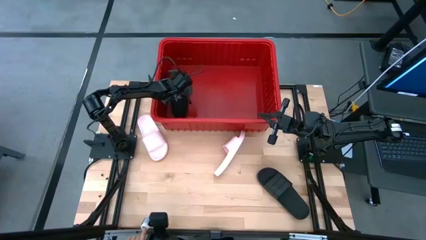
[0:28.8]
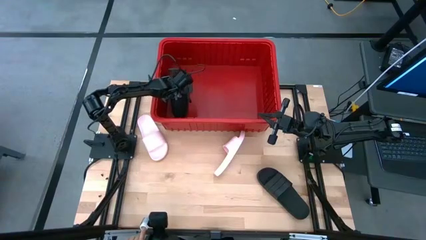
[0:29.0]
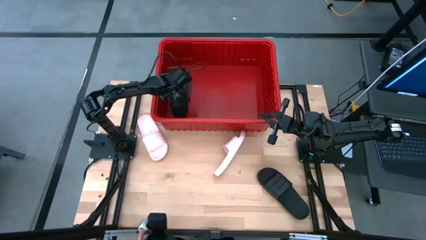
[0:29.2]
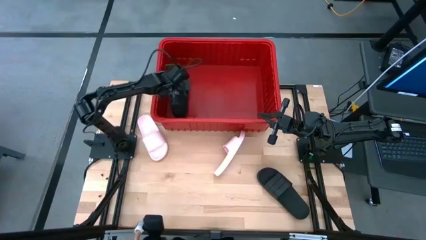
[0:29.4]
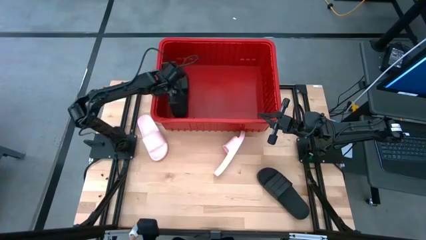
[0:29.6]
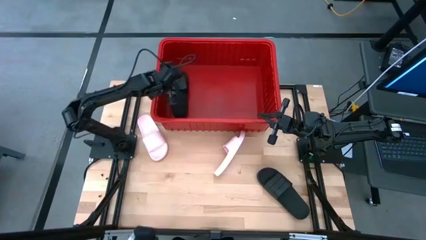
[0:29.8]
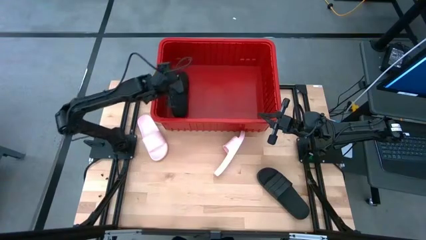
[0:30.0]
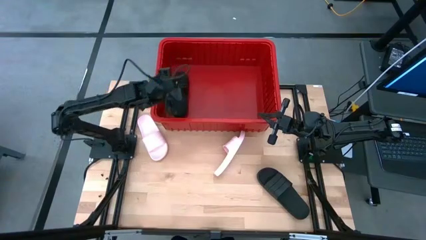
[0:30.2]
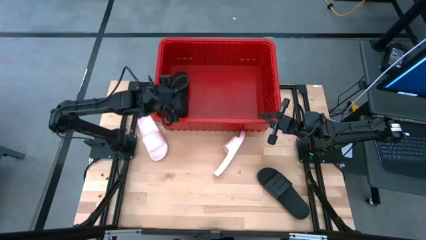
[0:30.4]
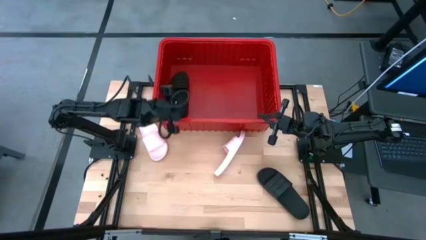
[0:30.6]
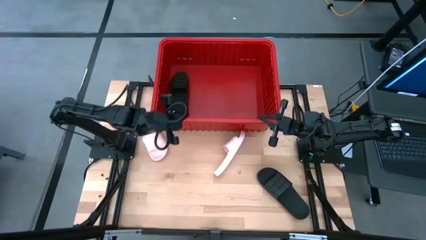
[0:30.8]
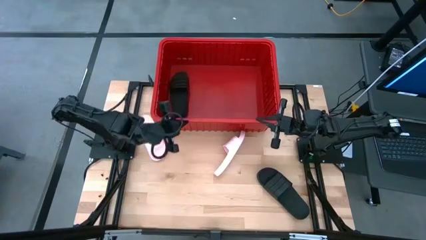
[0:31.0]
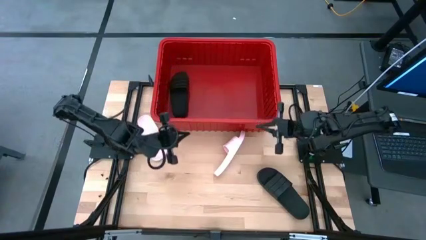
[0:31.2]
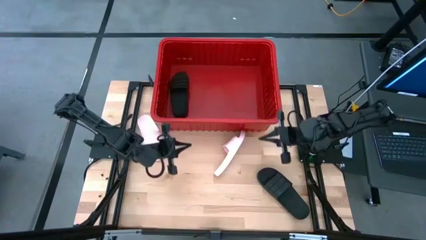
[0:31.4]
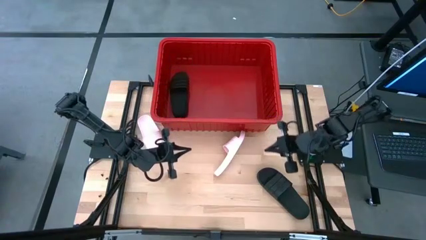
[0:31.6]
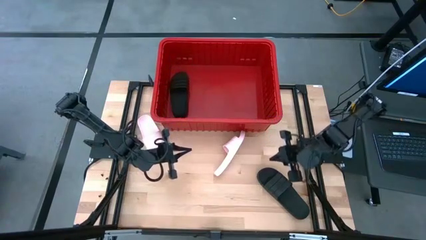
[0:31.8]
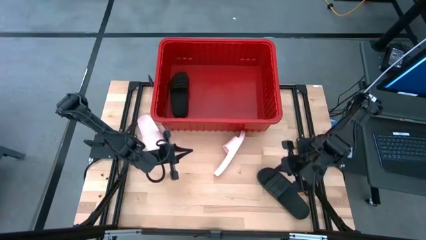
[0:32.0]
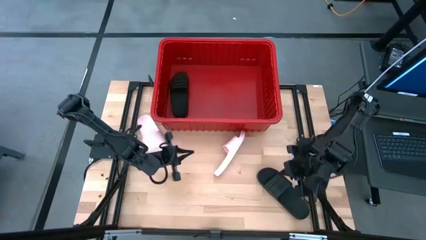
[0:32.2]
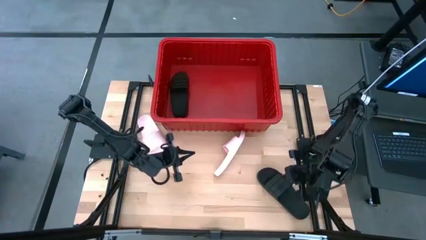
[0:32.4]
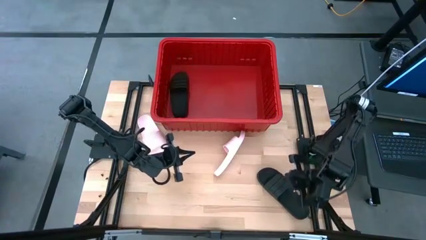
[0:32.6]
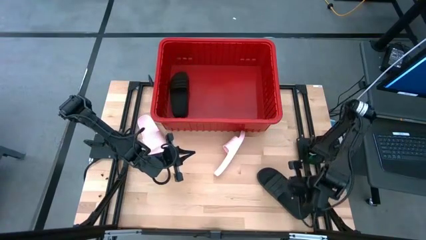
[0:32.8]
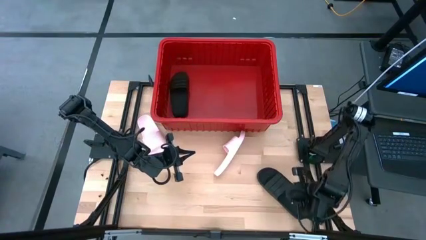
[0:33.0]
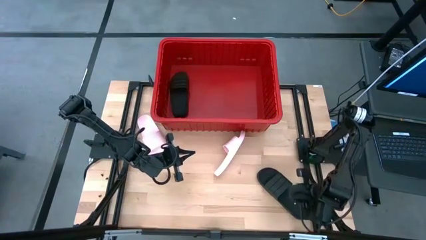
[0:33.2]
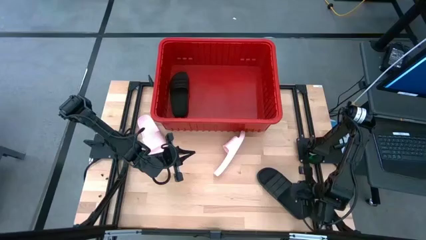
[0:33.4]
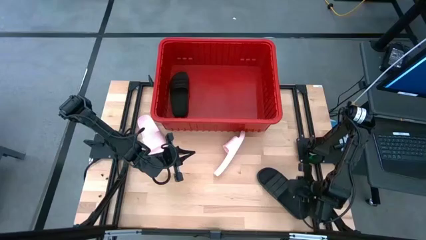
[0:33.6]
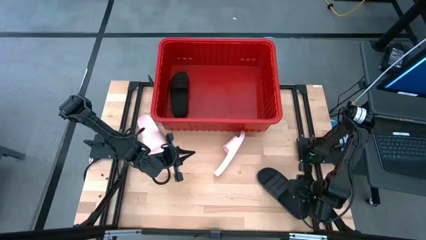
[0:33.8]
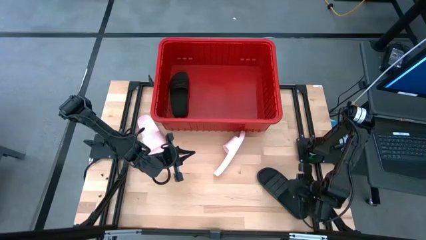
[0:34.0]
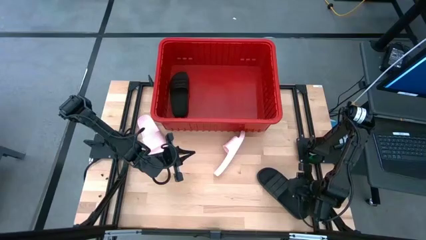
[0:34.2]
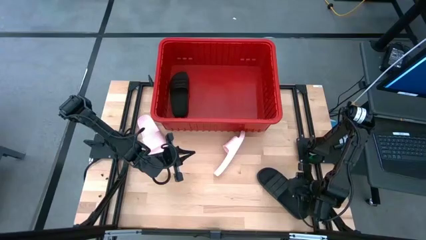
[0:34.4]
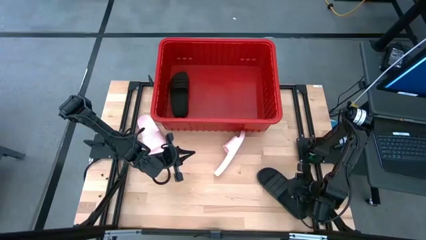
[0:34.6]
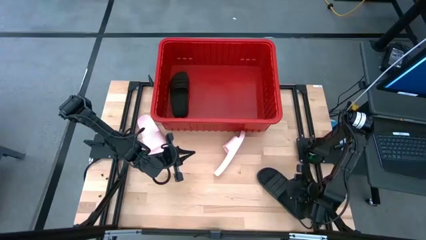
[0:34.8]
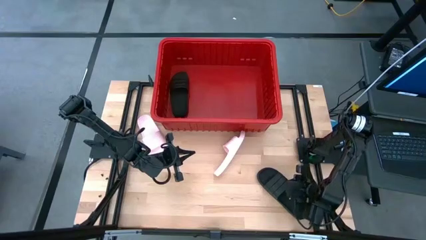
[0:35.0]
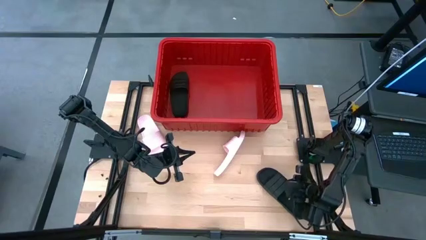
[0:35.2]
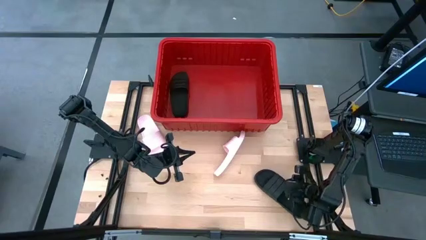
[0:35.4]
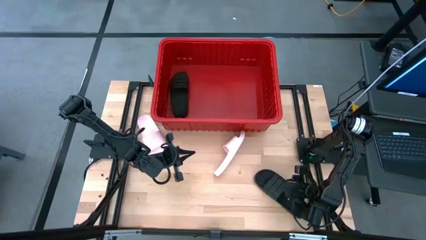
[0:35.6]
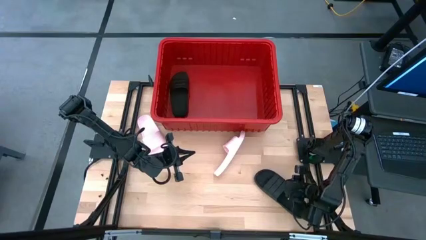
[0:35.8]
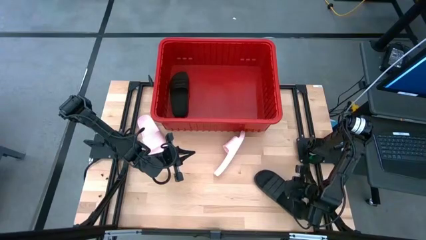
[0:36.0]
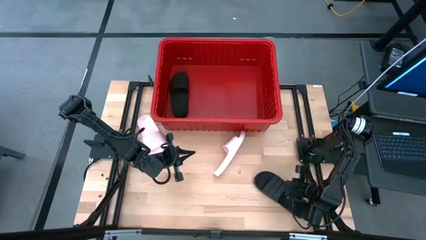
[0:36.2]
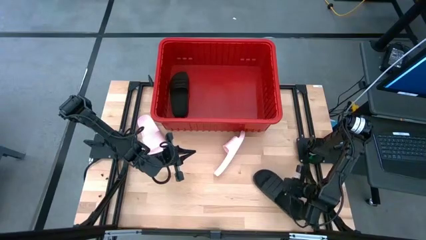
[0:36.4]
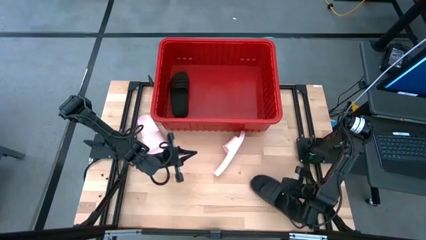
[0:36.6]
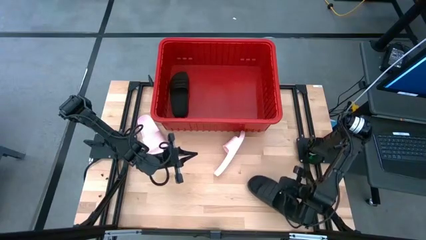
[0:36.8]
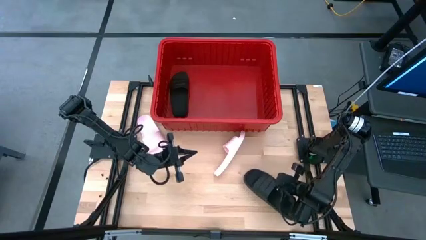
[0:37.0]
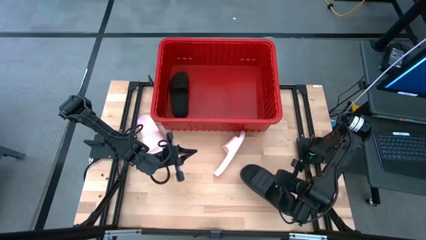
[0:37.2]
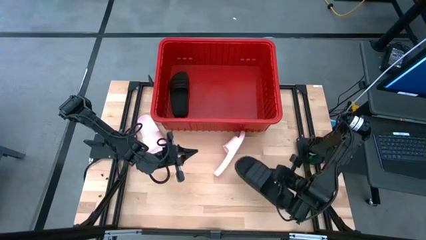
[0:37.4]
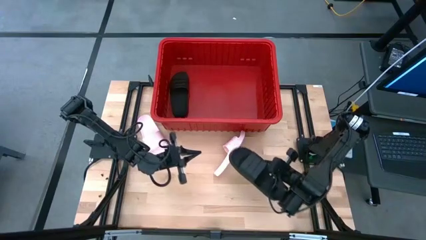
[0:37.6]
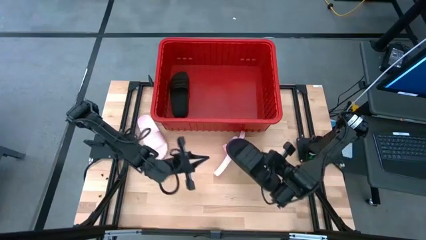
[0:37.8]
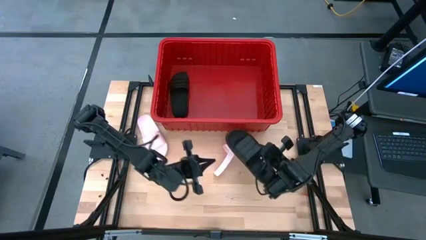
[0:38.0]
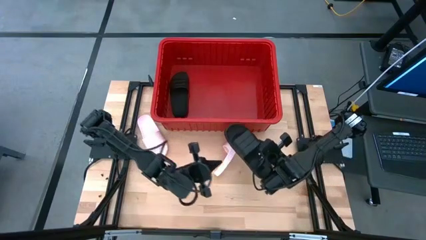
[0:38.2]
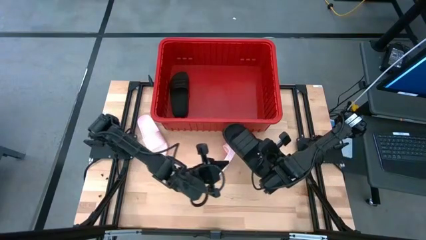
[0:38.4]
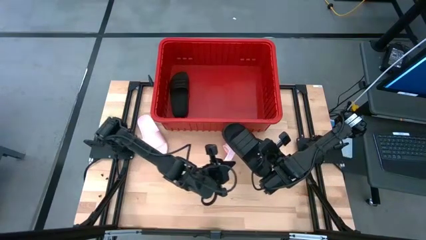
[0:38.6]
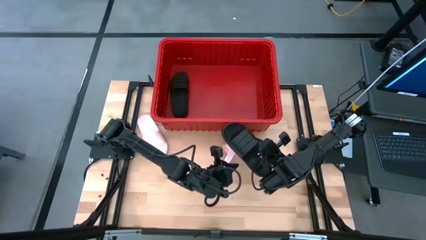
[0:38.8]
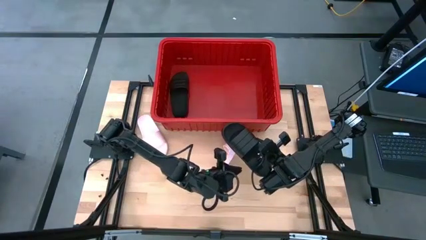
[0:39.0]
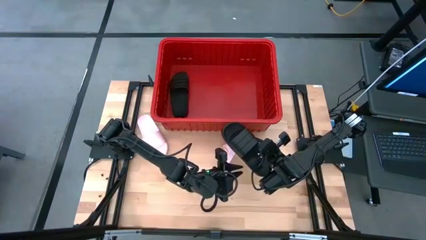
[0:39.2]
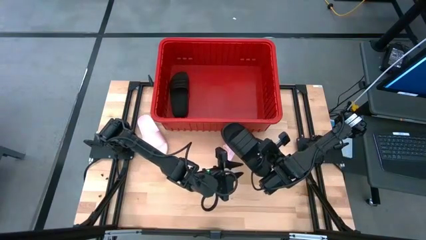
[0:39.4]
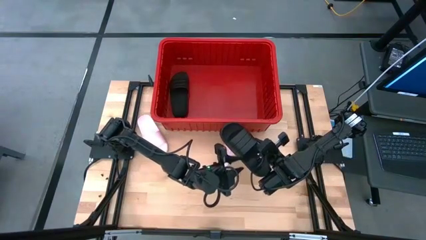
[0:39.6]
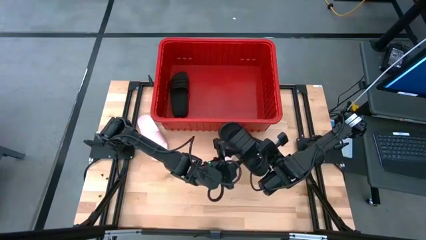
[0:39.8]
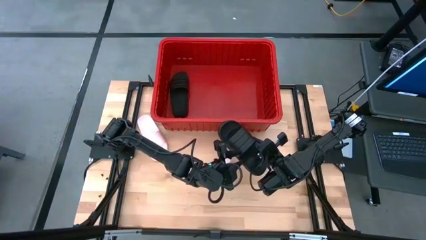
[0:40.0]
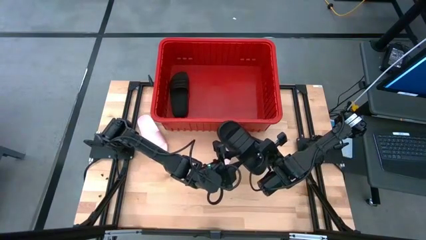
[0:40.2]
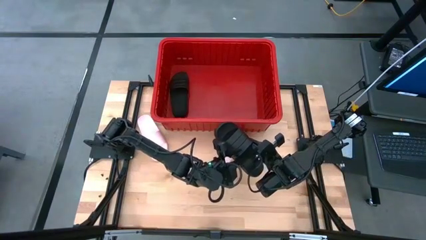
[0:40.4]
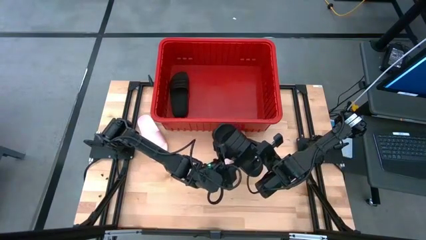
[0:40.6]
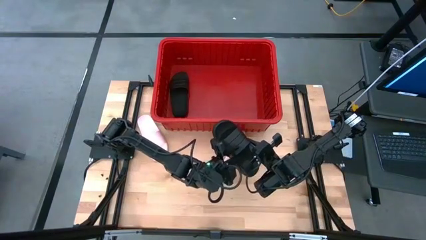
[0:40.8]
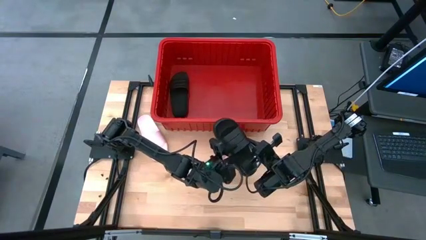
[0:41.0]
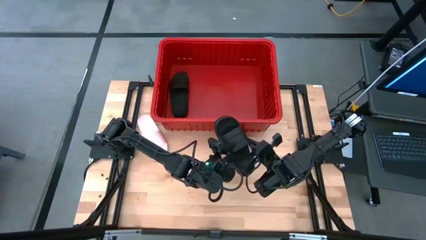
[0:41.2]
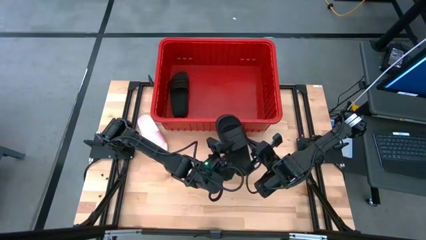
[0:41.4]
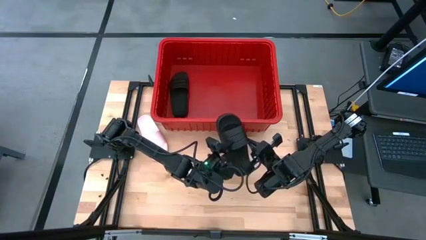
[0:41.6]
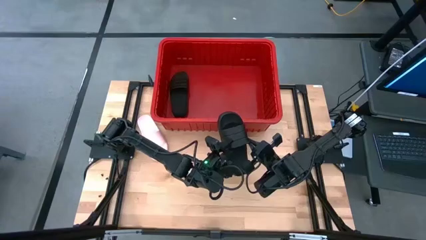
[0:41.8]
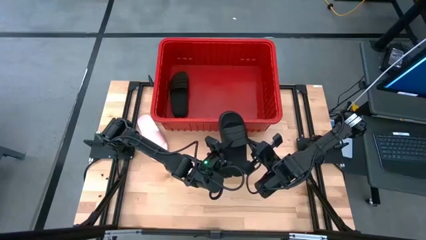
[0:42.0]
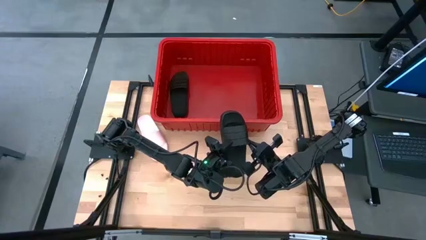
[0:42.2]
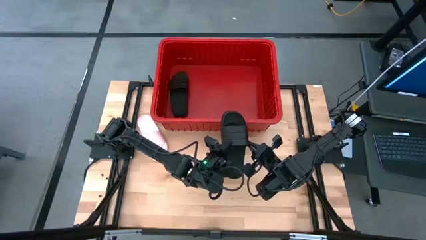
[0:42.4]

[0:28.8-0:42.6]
Task: Pick and place slides into bin
Put the black slide into the red bin
